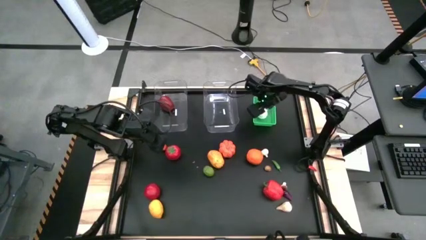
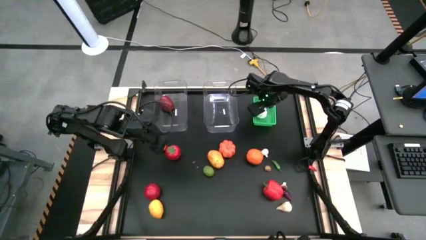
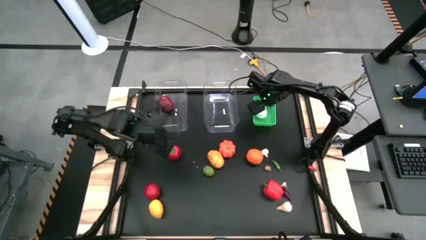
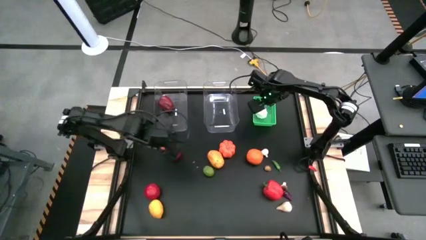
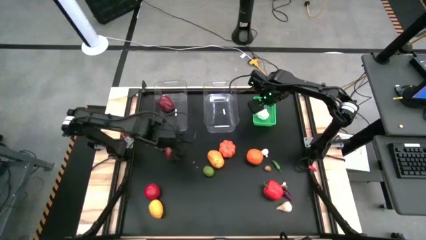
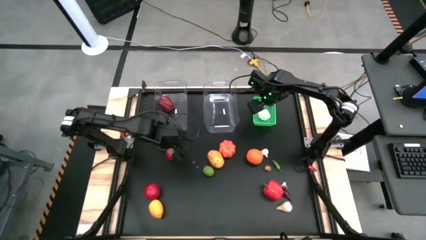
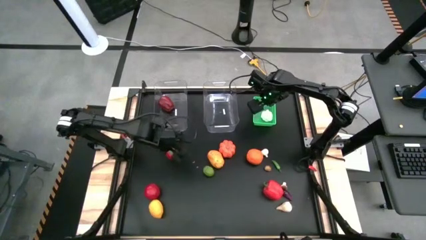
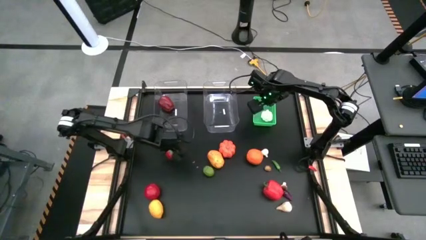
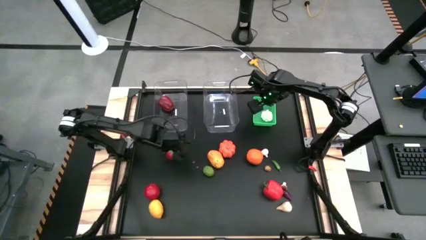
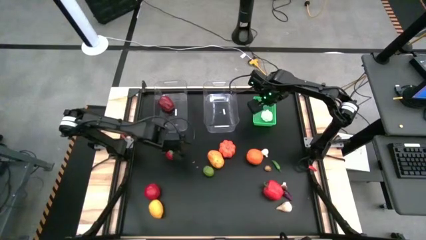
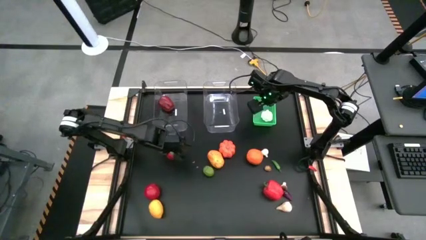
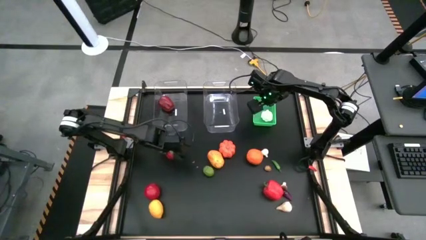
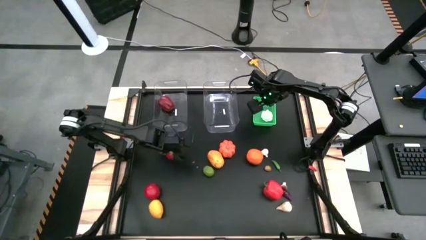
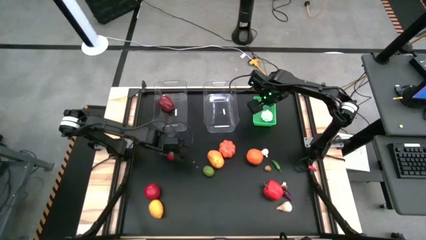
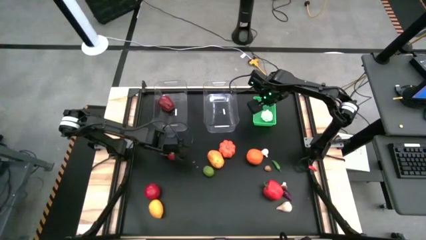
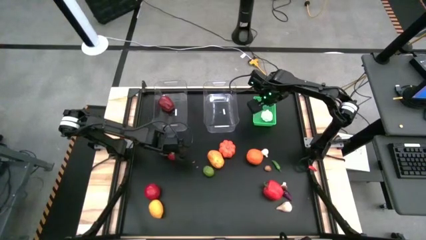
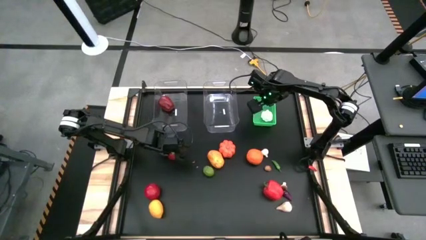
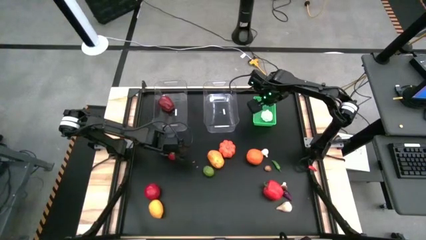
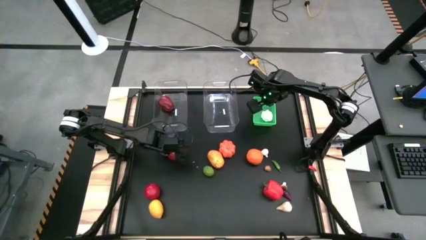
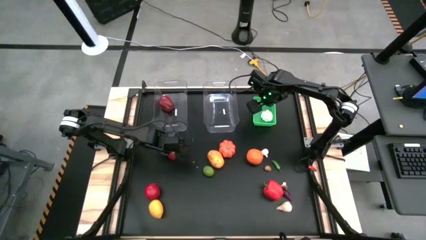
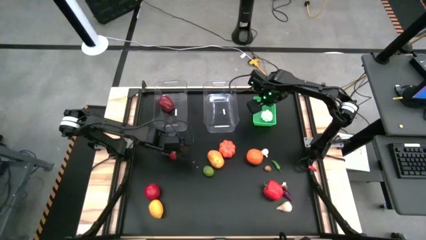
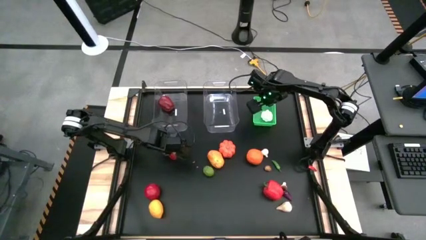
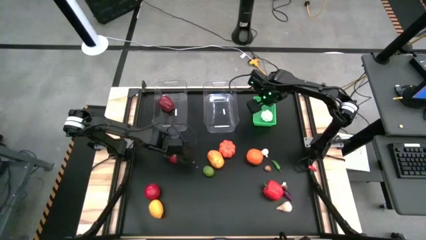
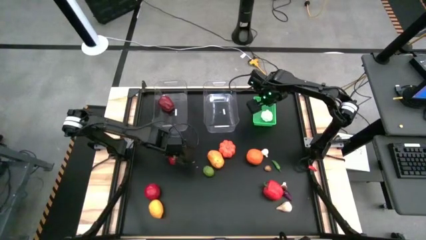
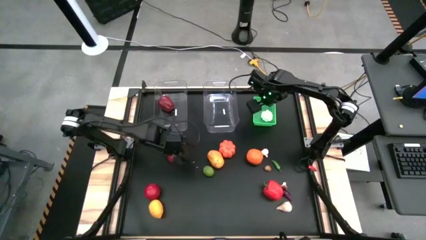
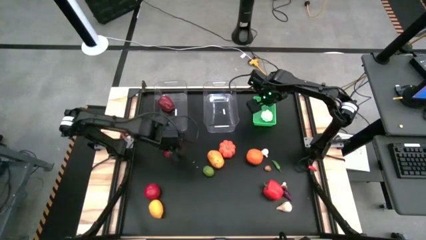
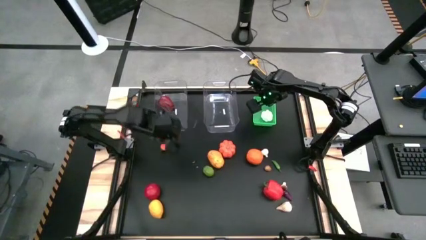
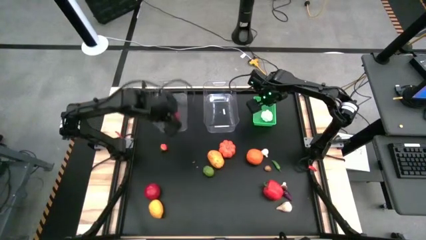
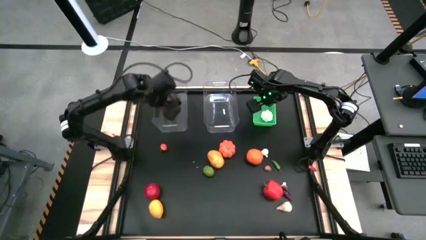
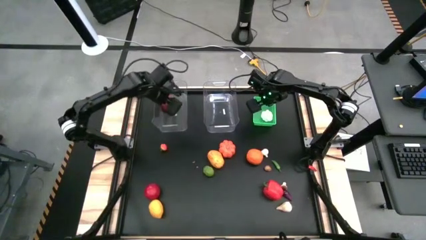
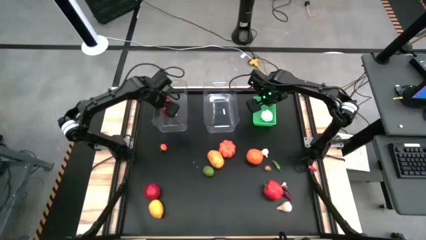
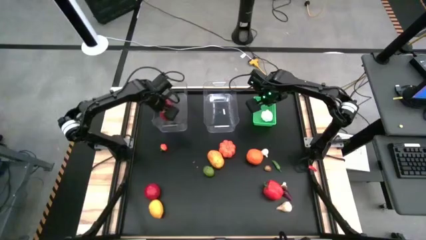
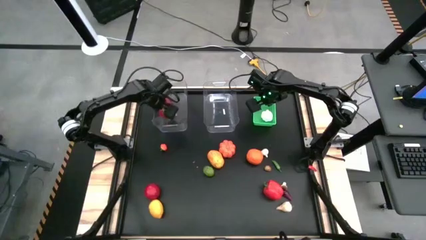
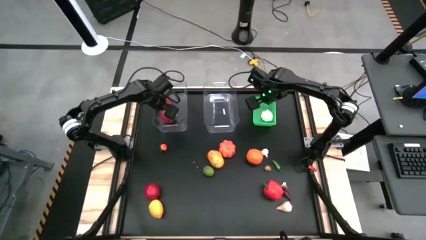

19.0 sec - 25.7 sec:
Task: Sort produce into baskets
Put the top tomato into the left transparent bin

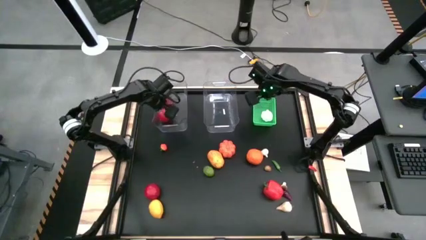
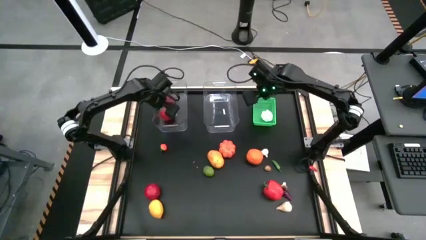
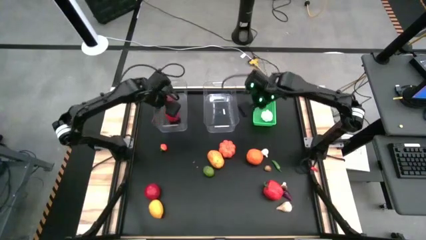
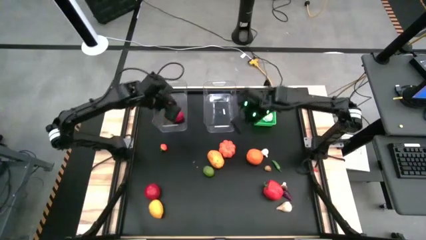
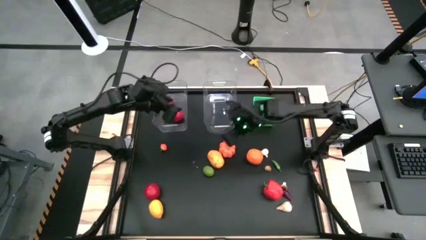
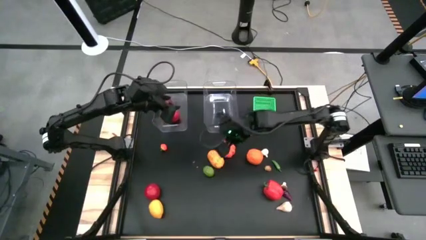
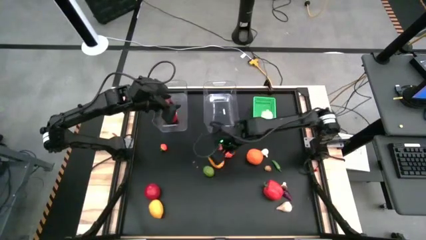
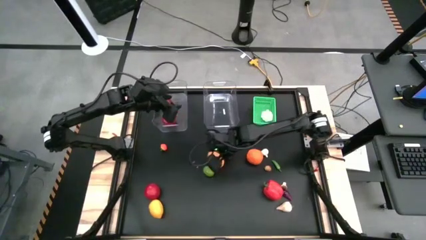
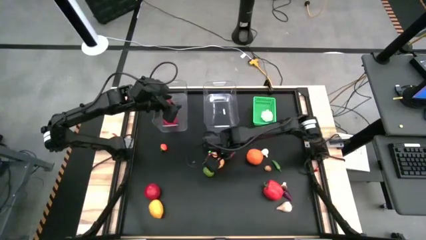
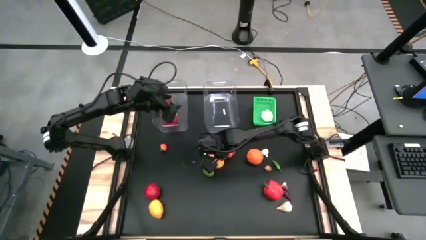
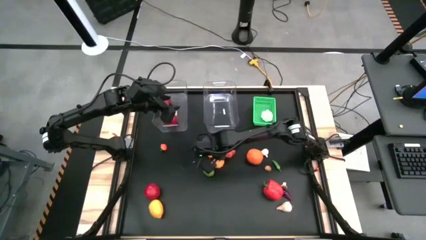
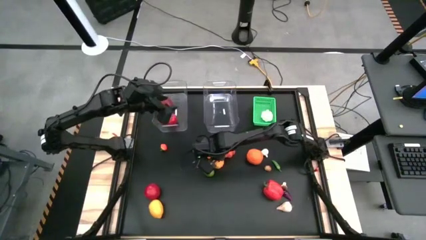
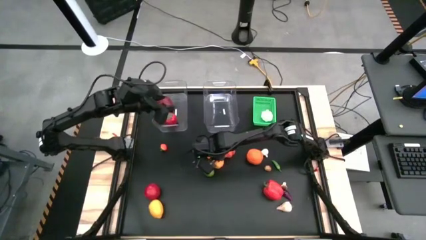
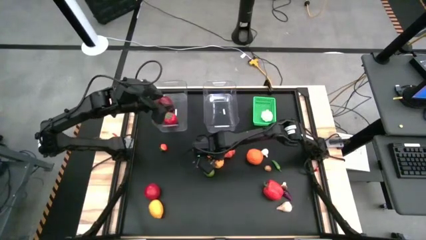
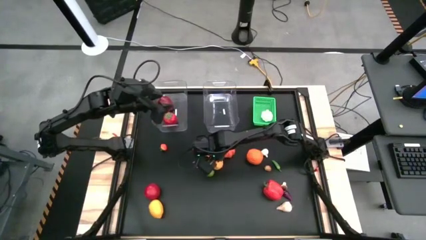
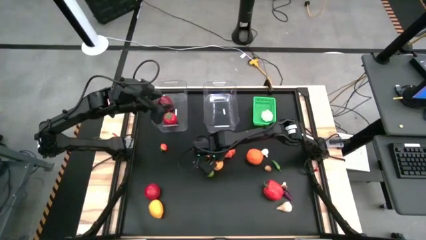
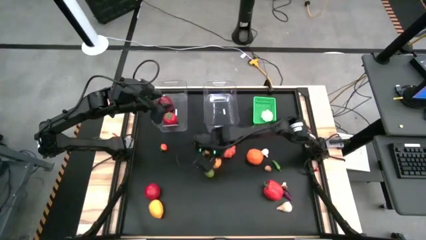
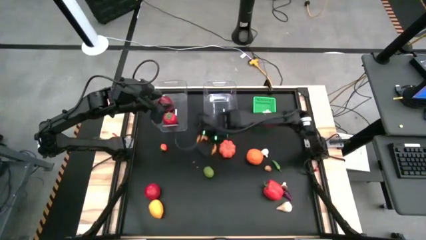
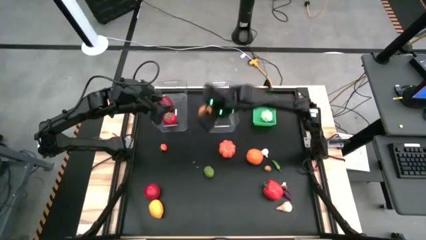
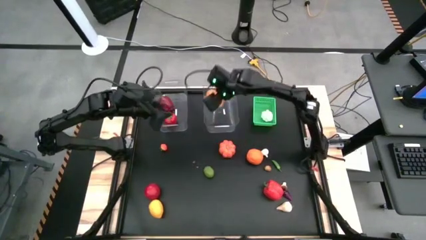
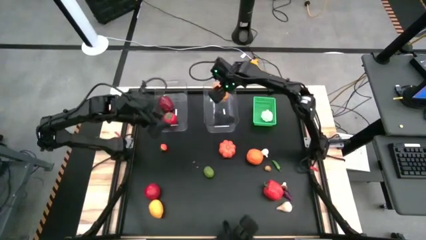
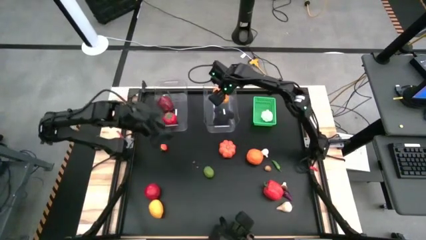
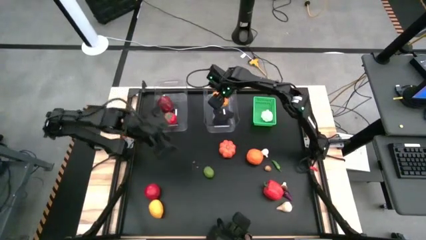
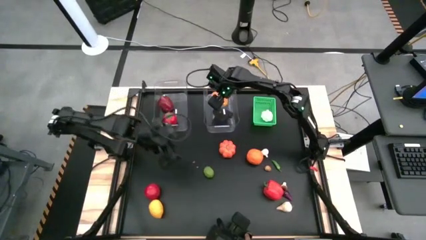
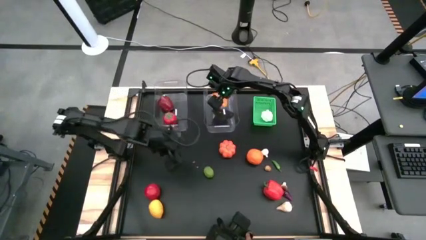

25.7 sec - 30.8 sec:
Put the potato into the right transparent bin

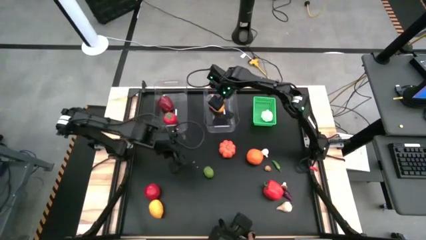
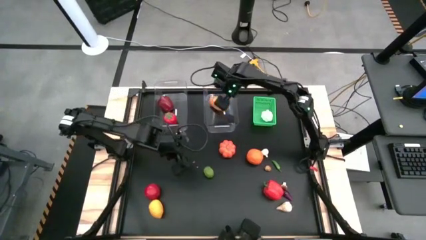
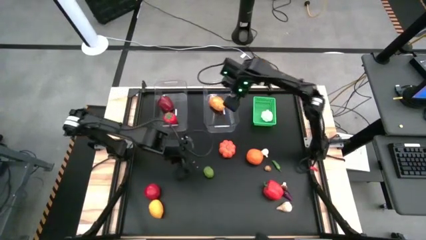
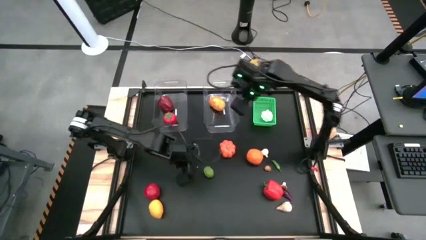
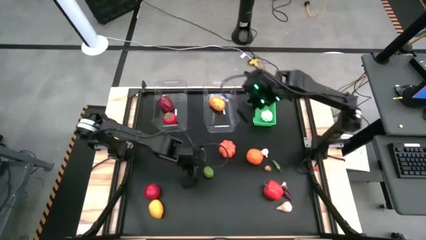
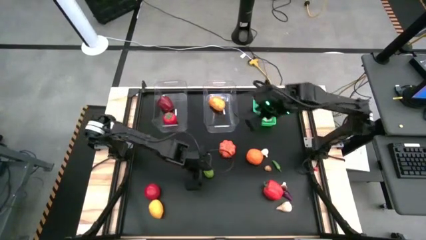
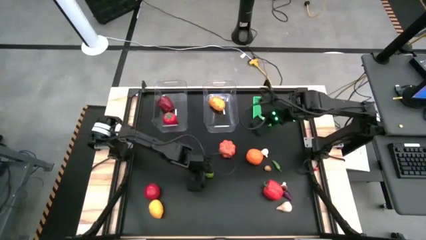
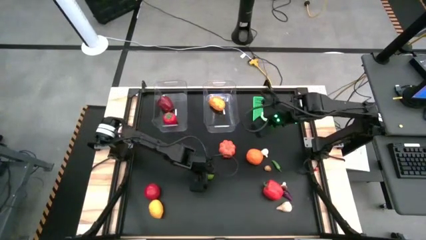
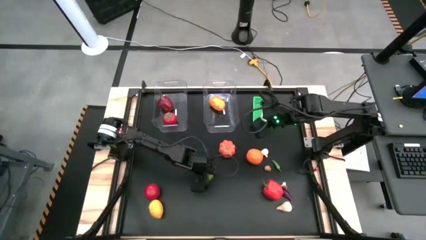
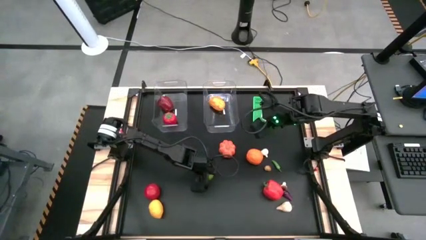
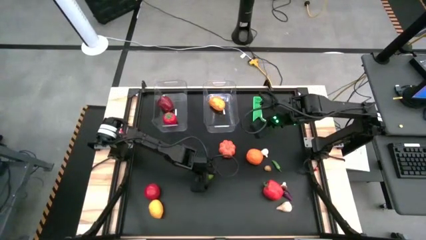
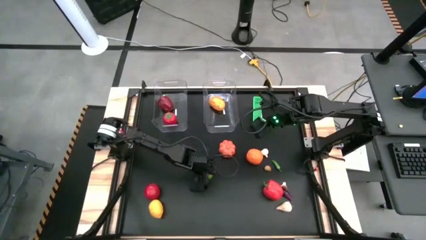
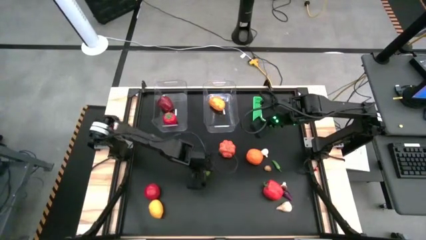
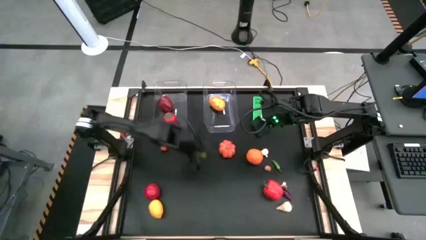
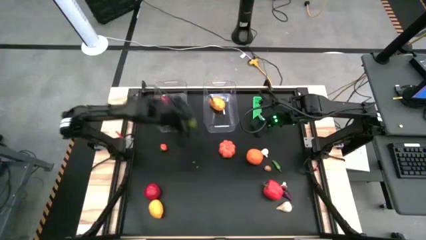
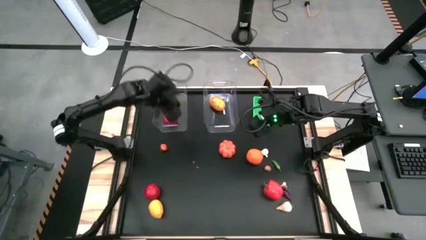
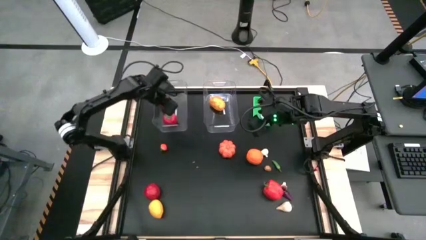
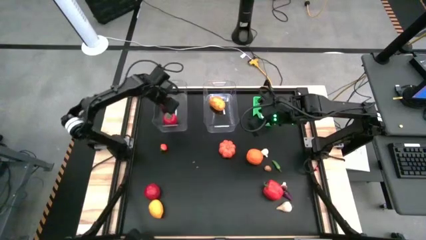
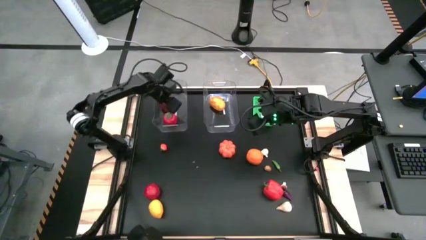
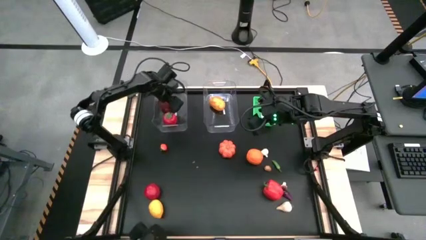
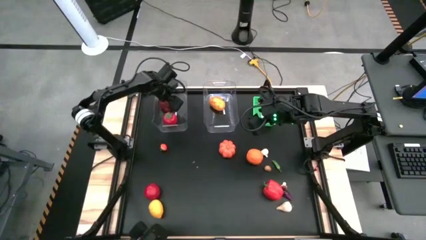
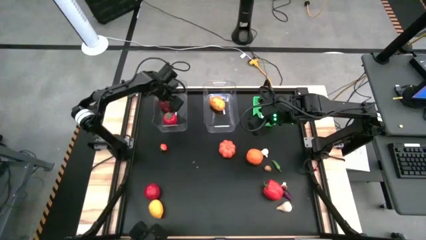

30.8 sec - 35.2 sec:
Put the lime into the left transparent bin
